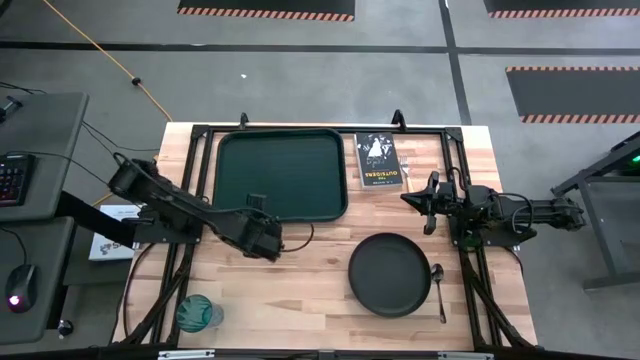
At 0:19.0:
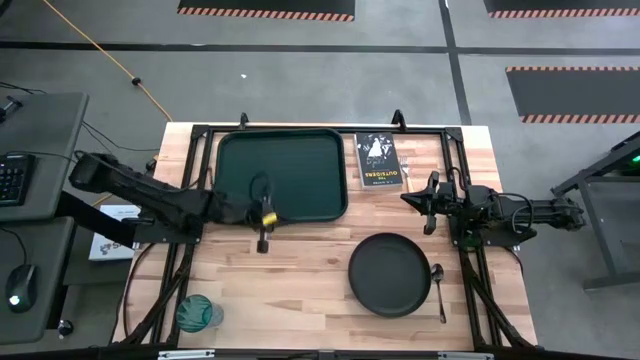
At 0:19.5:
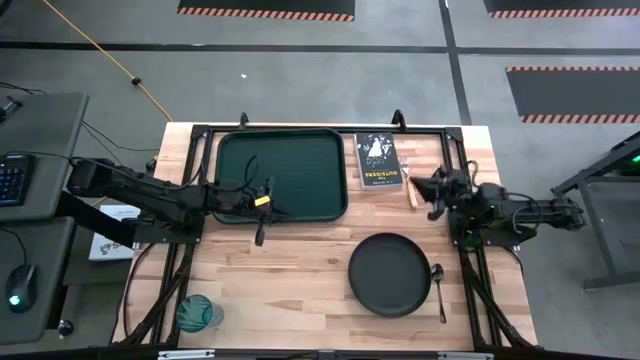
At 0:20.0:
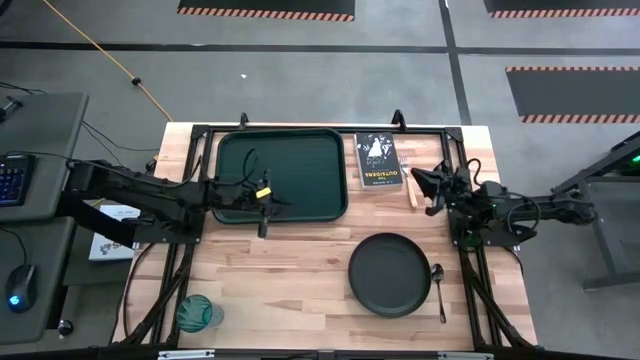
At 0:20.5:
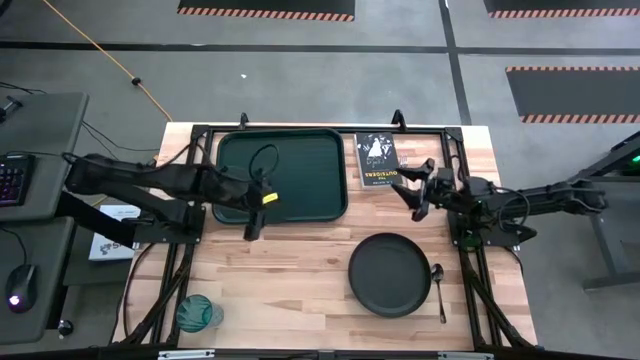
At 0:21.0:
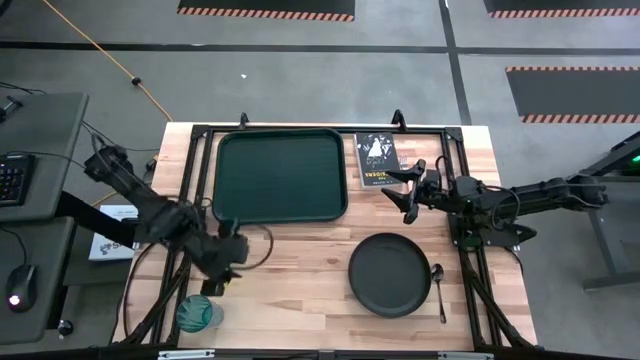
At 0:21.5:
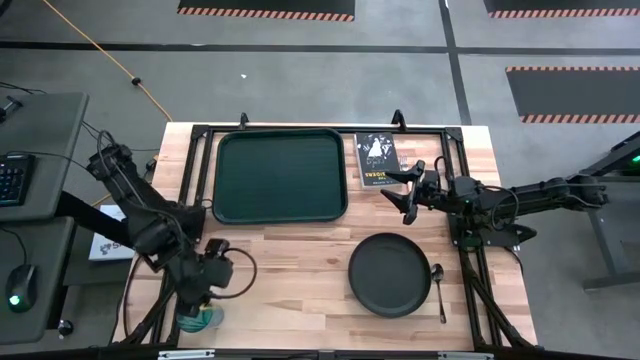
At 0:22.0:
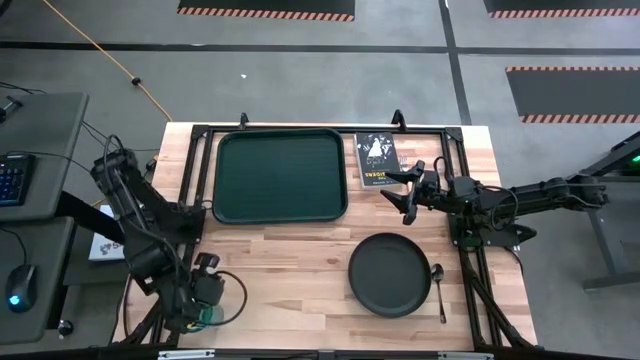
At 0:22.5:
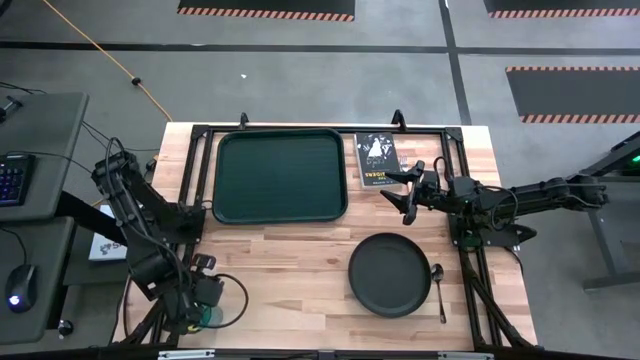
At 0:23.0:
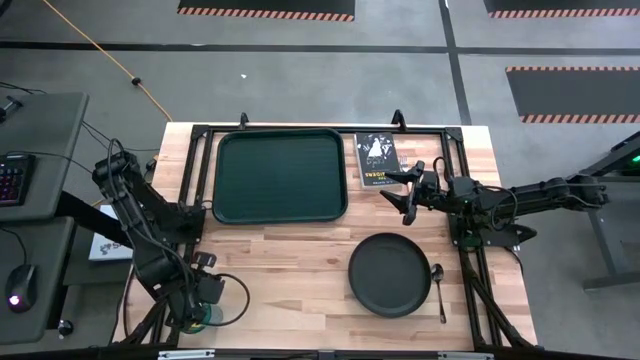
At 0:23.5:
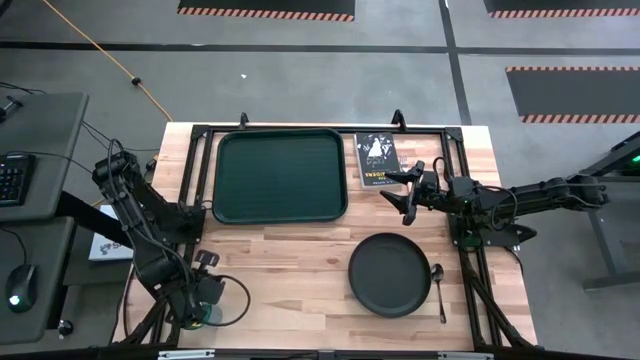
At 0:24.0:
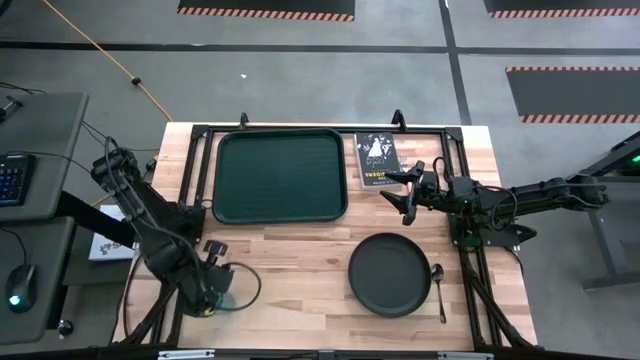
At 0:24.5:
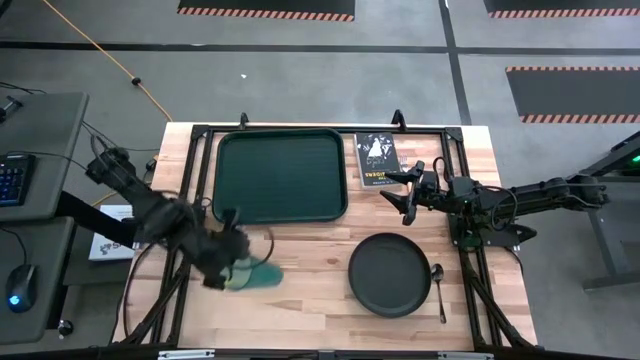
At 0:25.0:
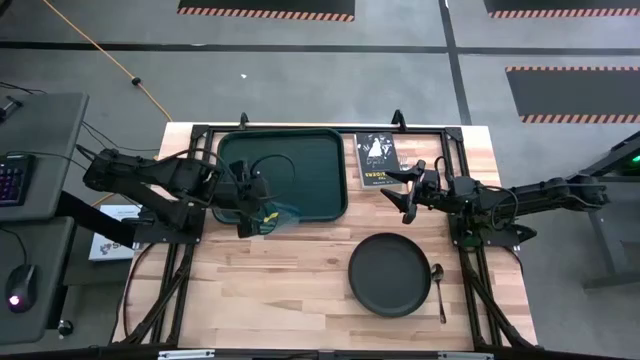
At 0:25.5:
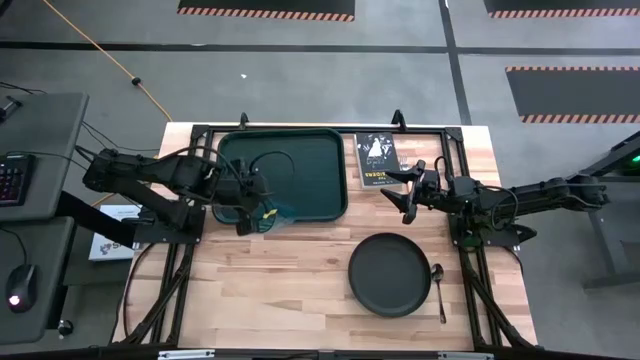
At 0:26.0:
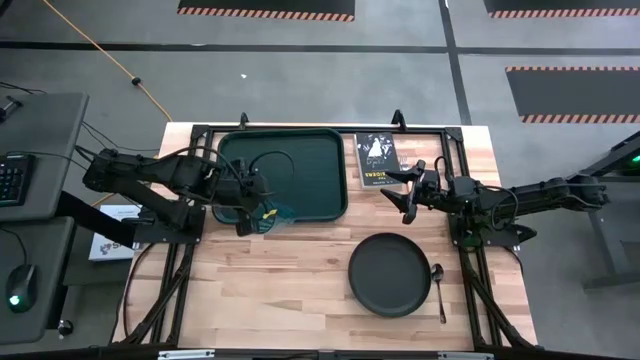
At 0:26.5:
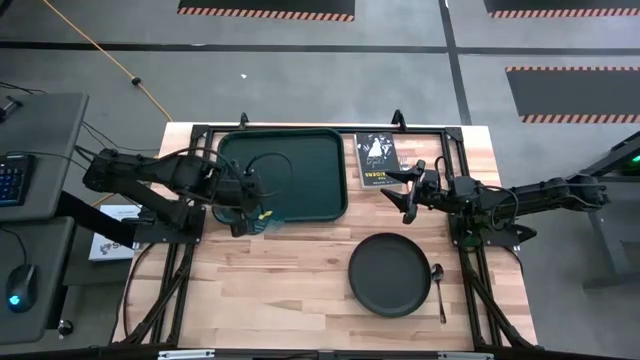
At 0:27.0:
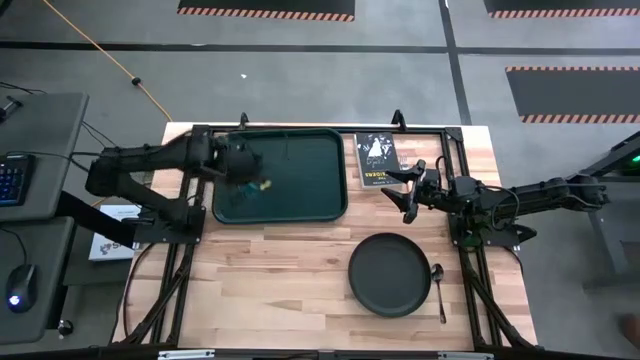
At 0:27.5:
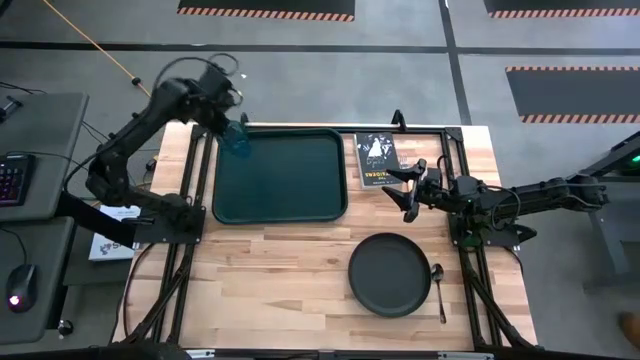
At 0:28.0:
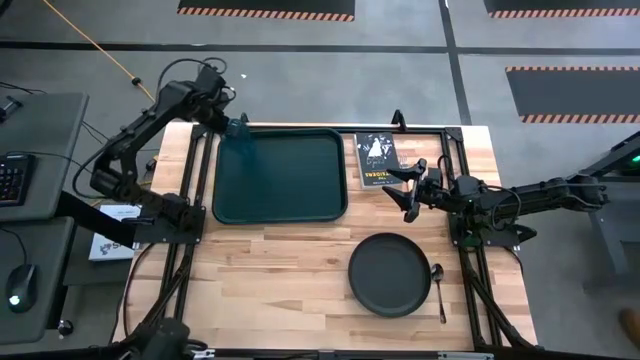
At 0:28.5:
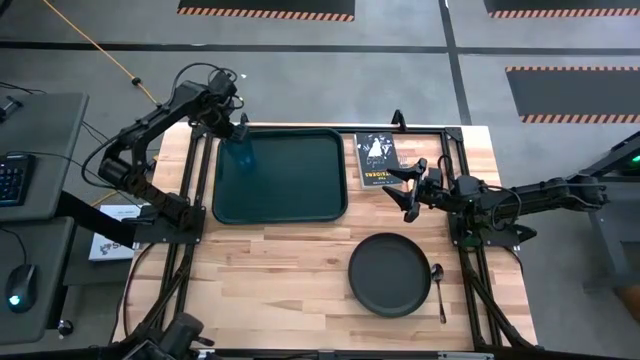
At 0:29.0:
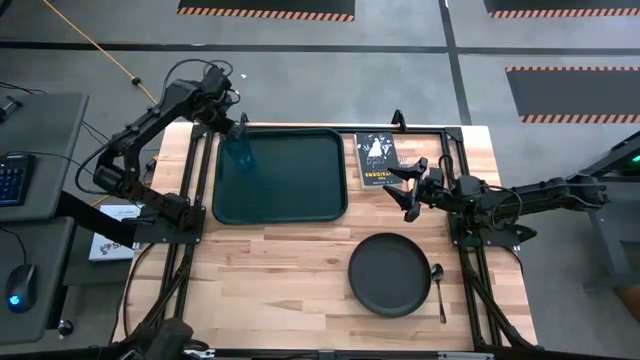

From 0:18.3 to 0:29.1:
Task: Pick and place plate/cup/fork/spoon on tray
Put the blue cup on the dark green tray

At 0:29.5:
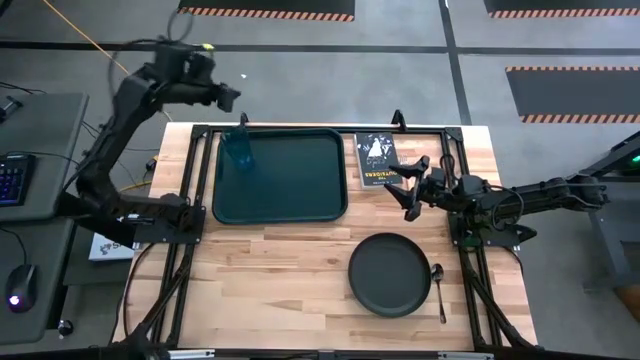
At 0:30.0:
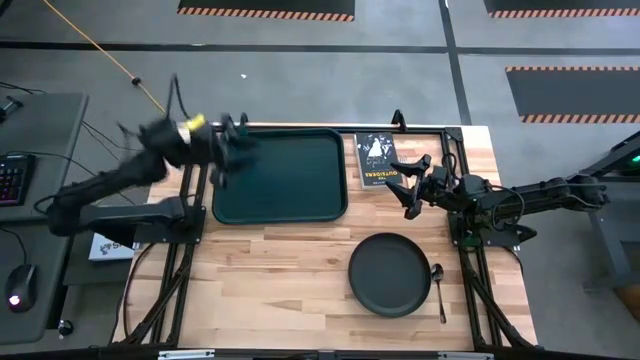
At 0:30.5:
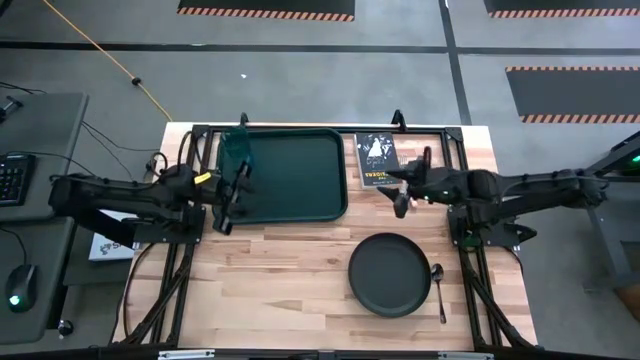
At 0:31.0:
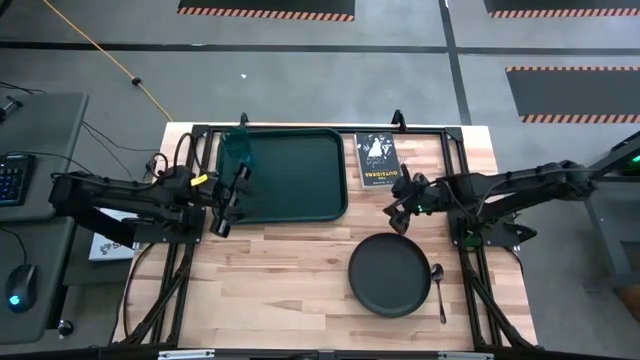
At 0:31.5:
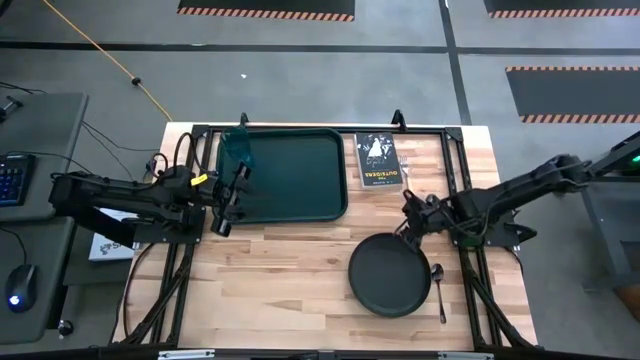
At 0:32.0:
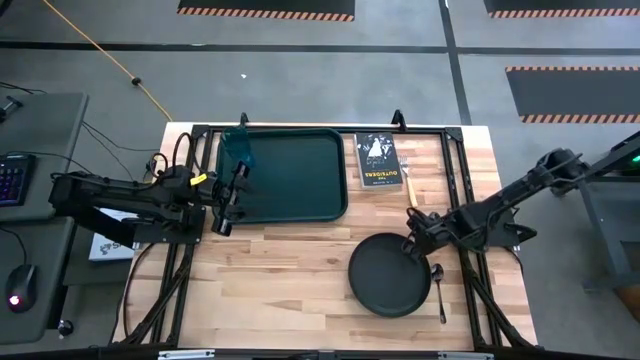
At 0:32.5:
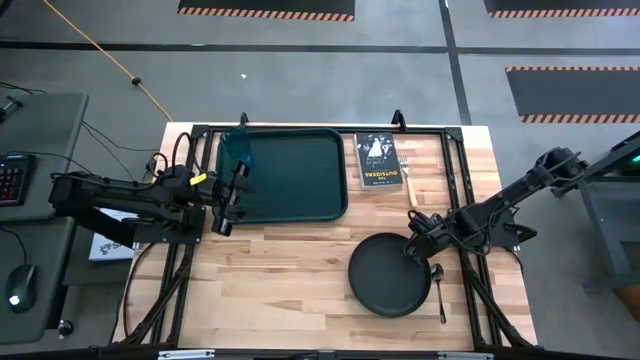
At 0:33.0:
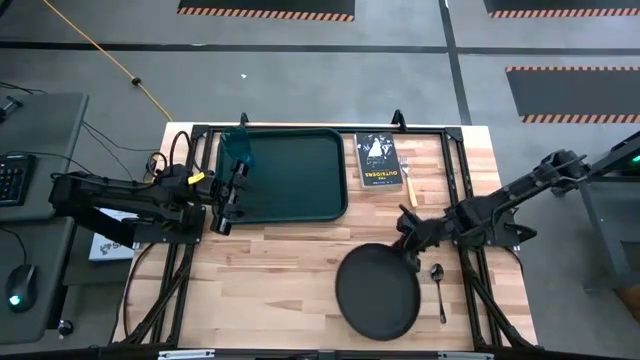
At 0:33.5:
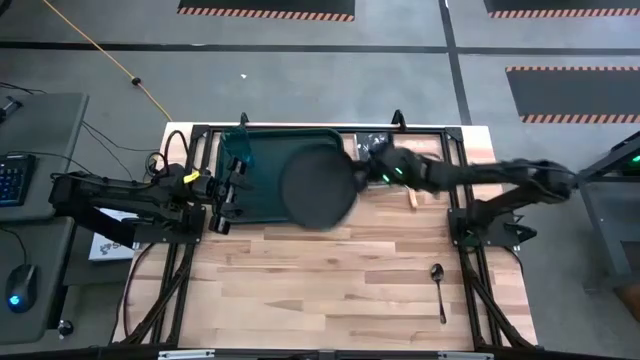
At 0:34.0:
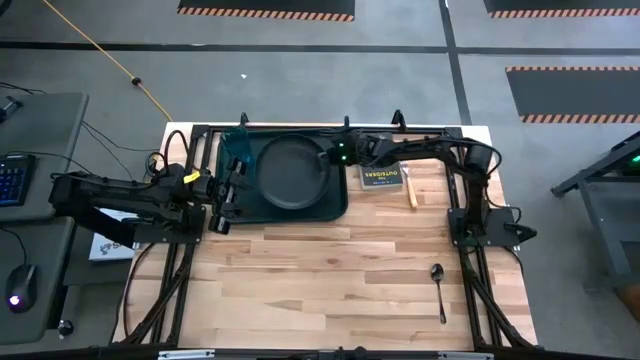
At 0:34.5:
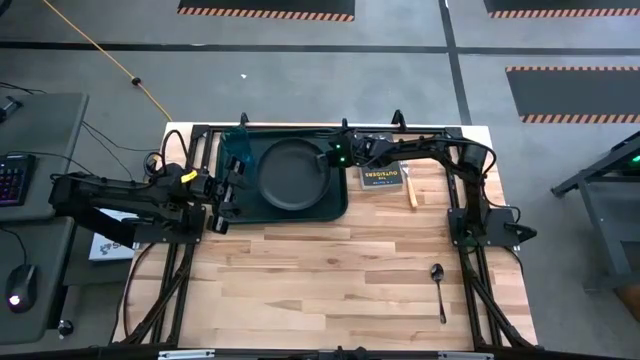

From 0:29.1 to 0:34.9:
Put the black plate on the dark green tray

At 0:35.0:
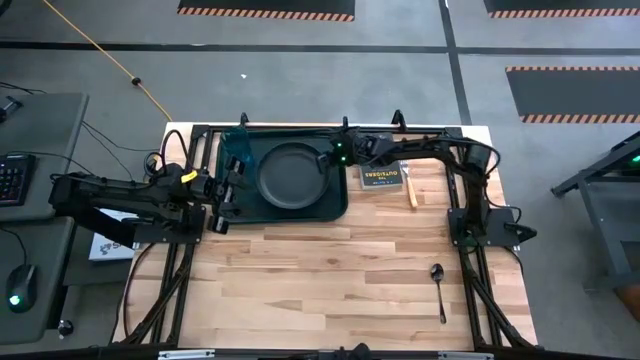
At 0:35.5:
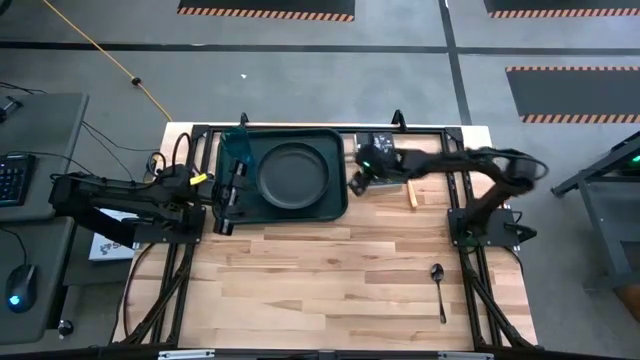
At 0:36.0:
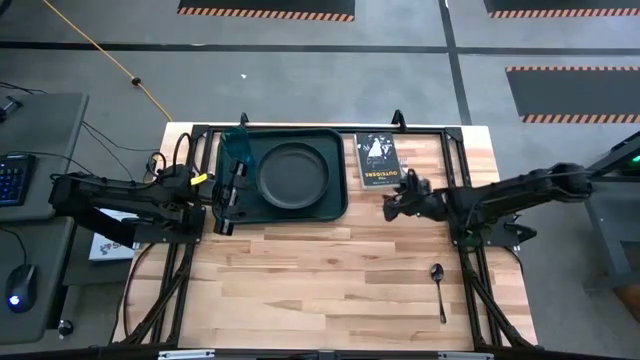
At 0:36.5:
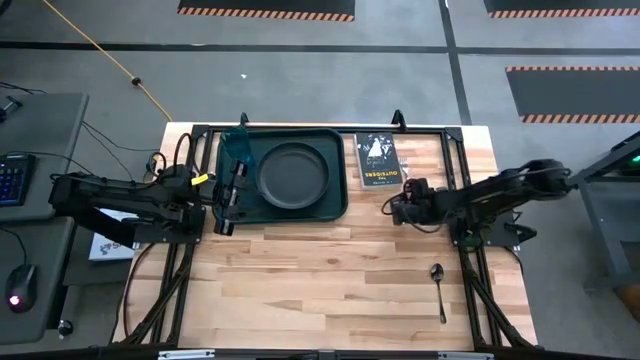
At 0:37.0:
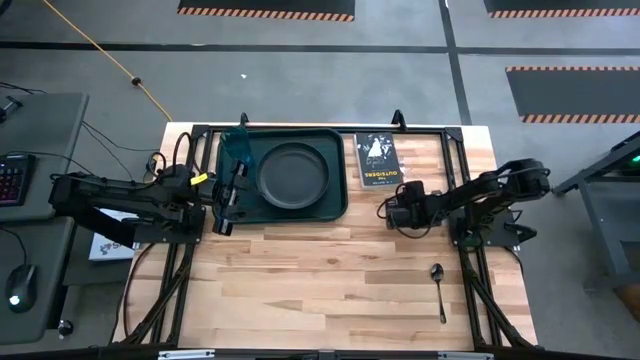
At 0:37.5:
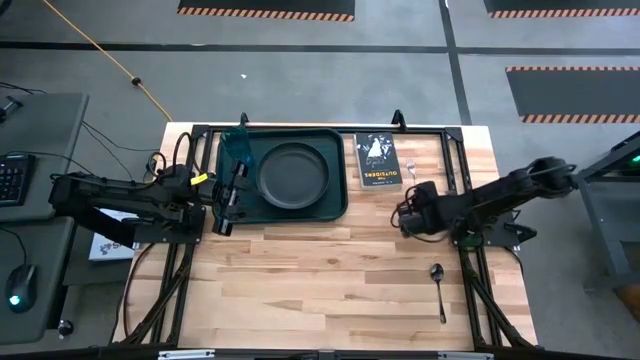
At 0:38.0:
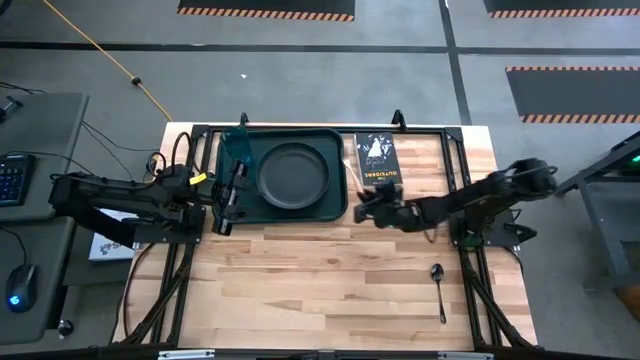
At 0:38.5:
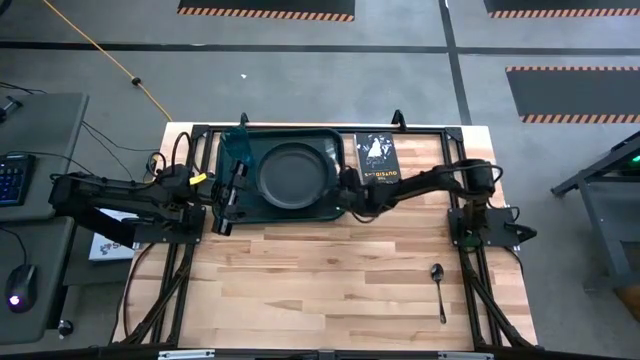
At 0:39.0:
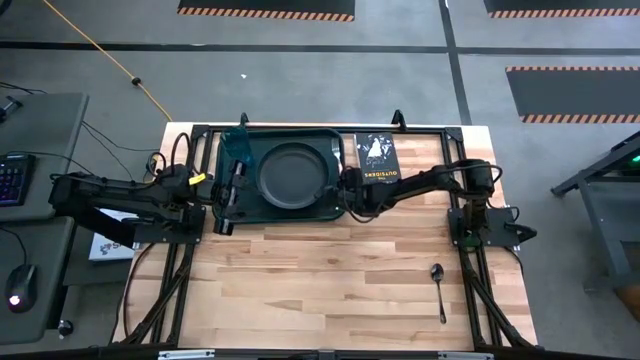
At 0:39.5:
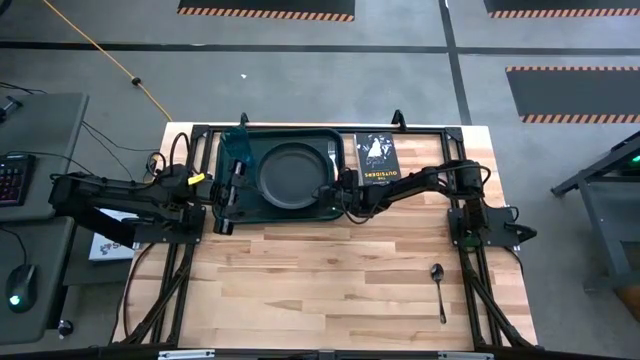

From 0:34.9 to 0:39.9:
Put the orange fork on the dark green tray
